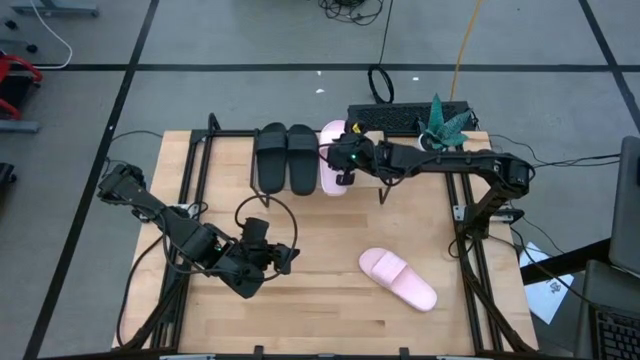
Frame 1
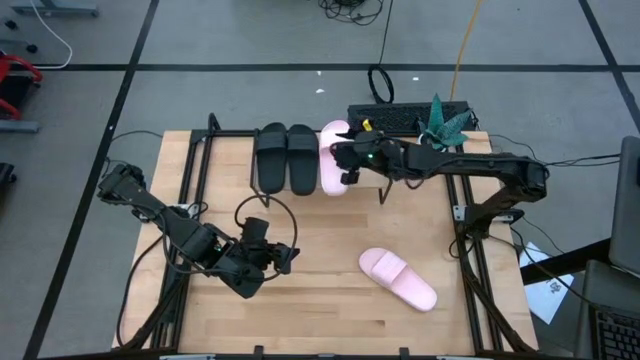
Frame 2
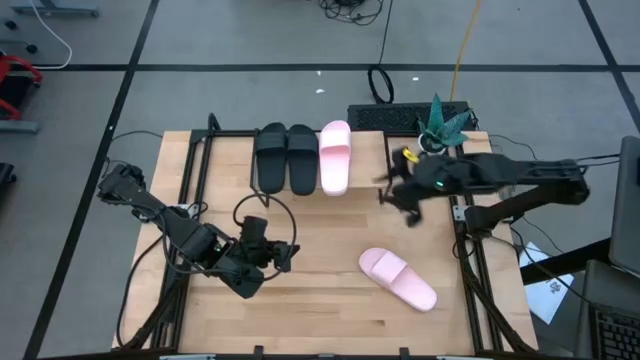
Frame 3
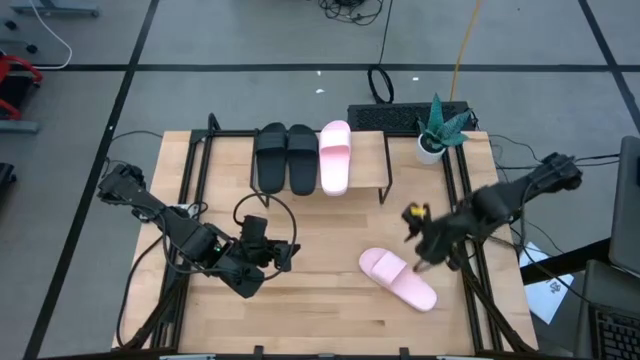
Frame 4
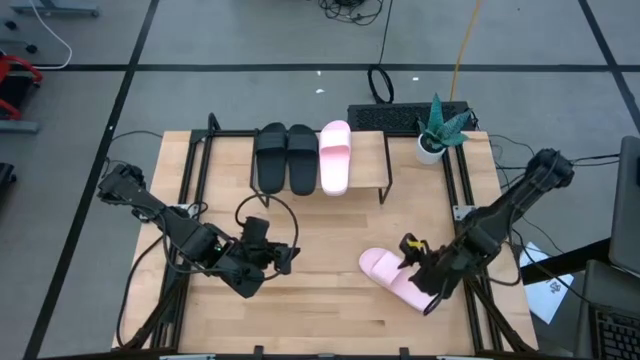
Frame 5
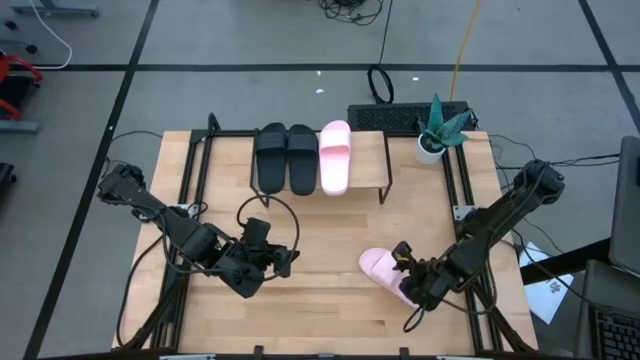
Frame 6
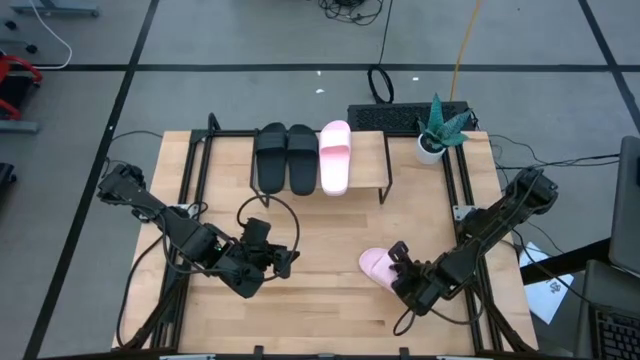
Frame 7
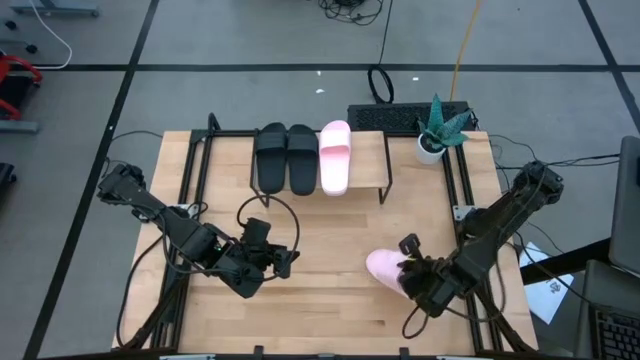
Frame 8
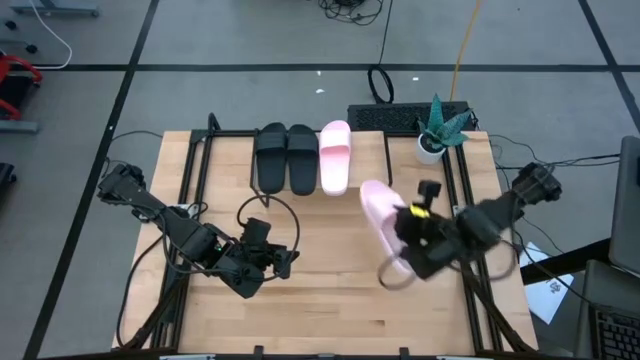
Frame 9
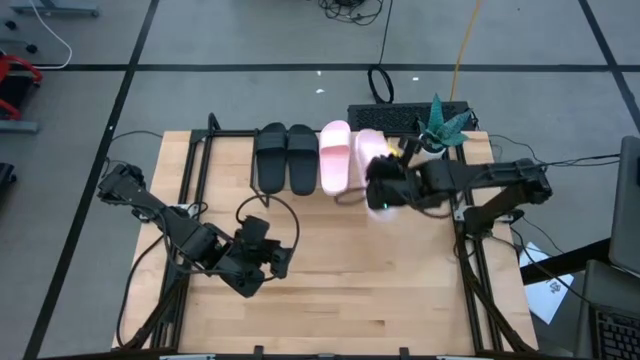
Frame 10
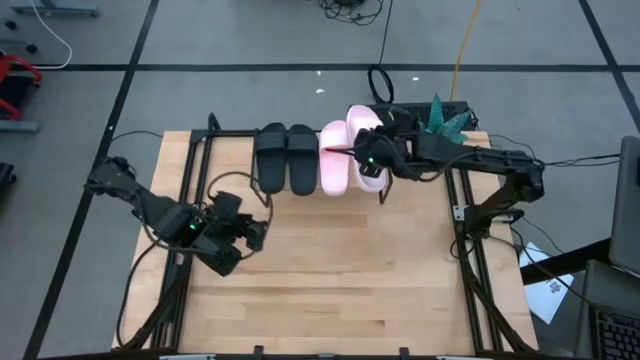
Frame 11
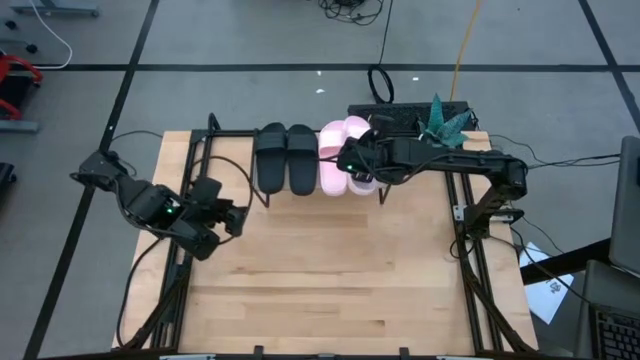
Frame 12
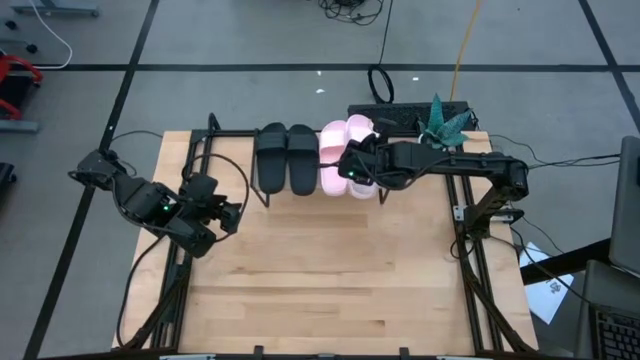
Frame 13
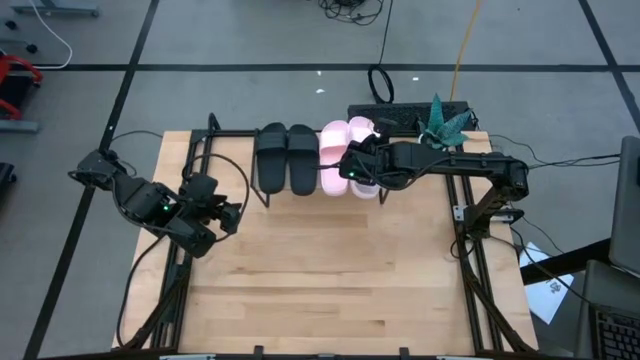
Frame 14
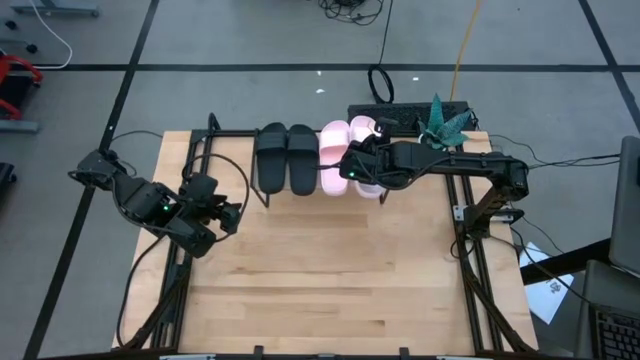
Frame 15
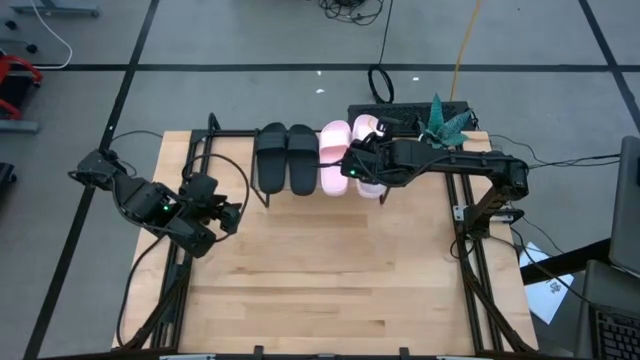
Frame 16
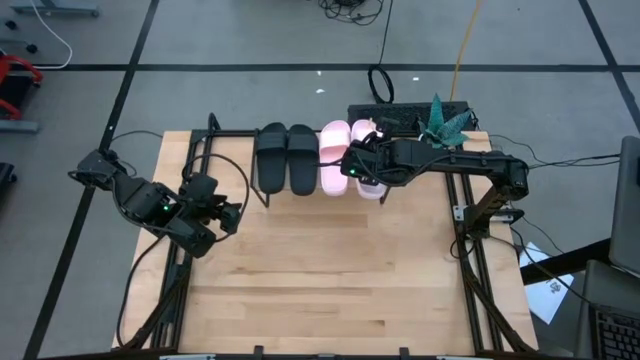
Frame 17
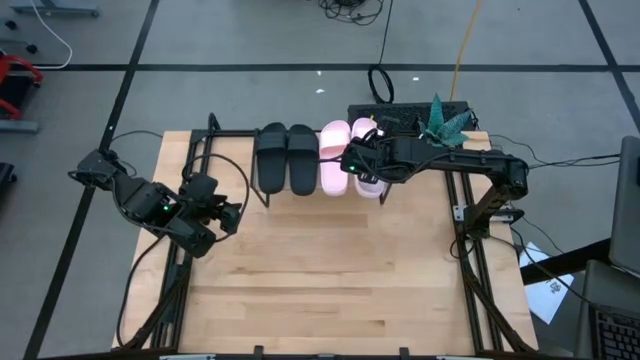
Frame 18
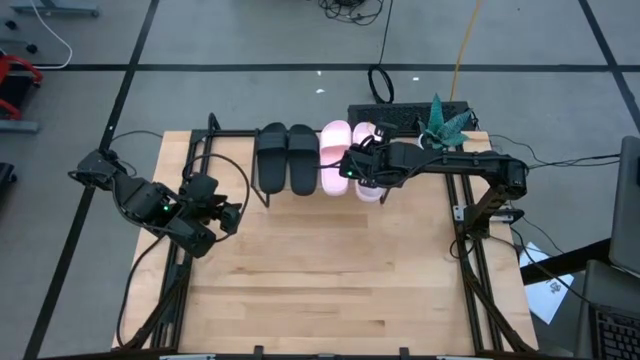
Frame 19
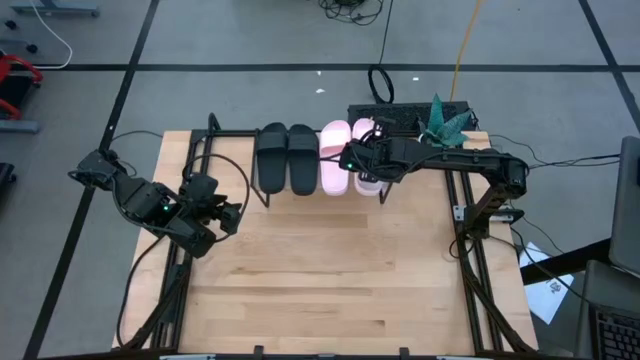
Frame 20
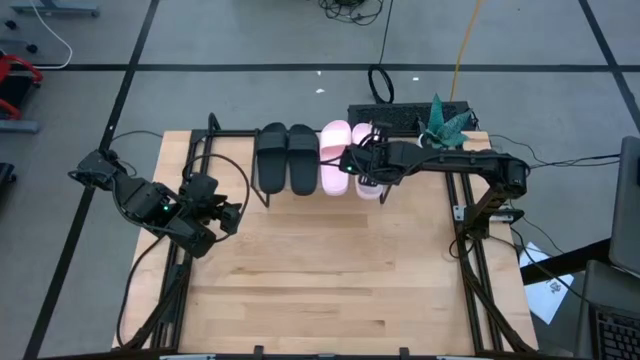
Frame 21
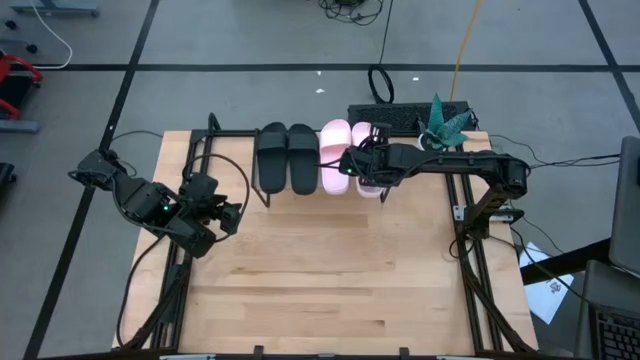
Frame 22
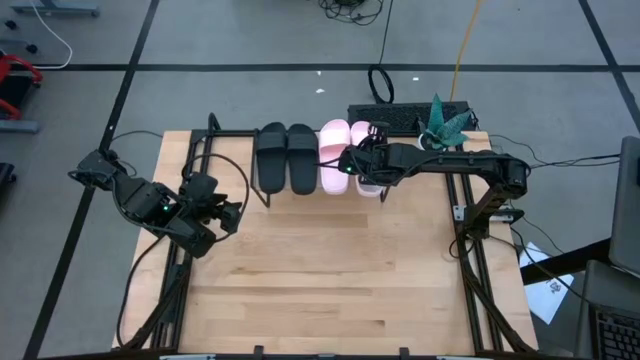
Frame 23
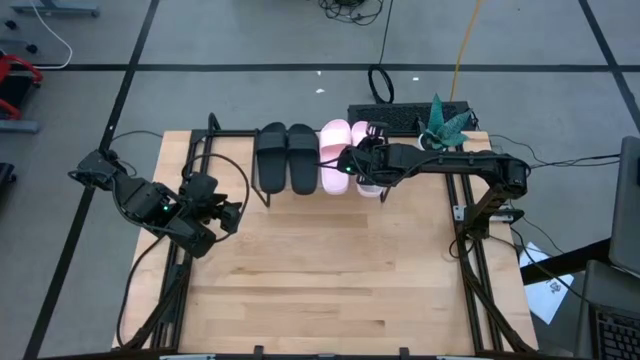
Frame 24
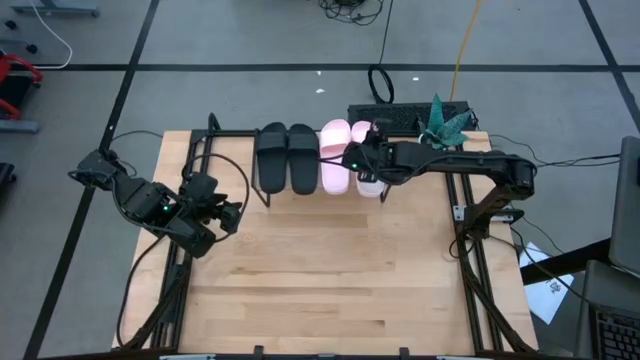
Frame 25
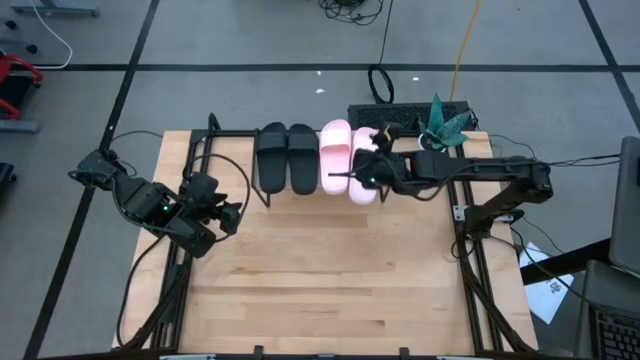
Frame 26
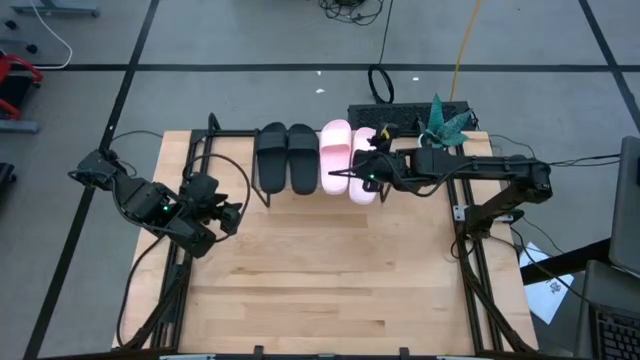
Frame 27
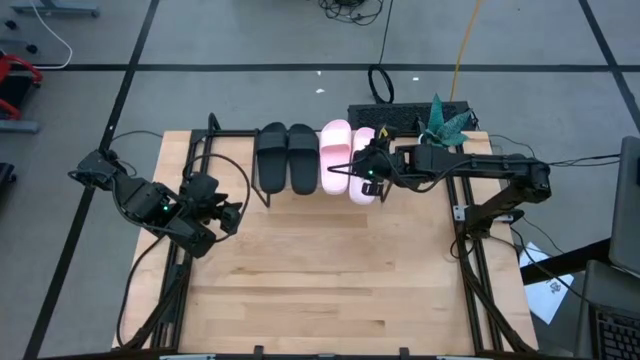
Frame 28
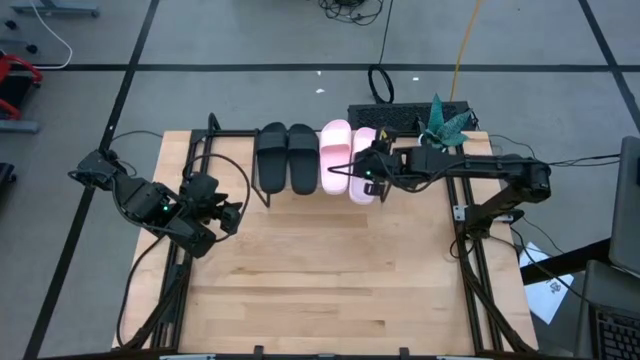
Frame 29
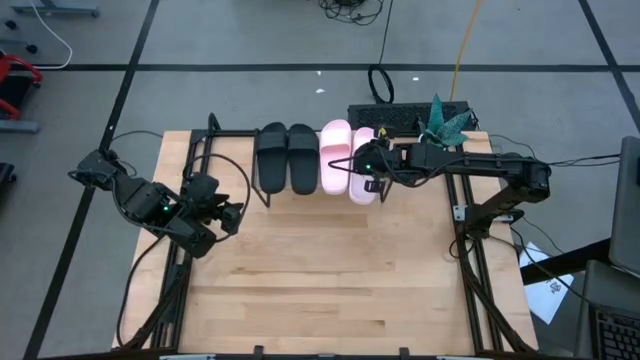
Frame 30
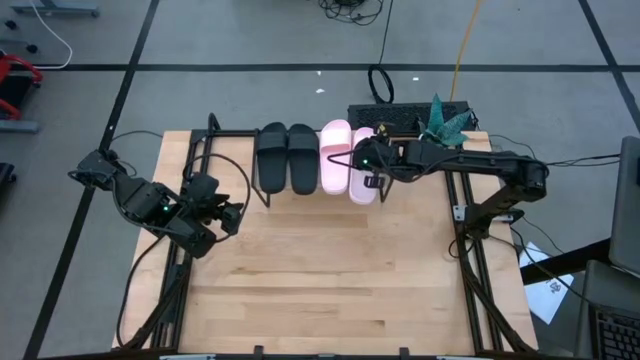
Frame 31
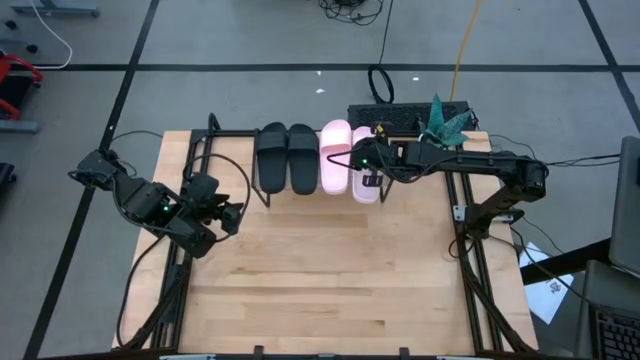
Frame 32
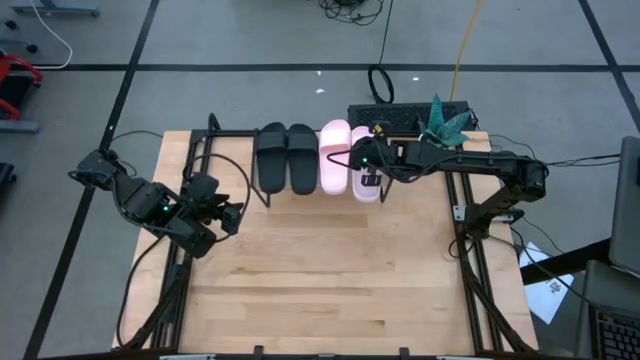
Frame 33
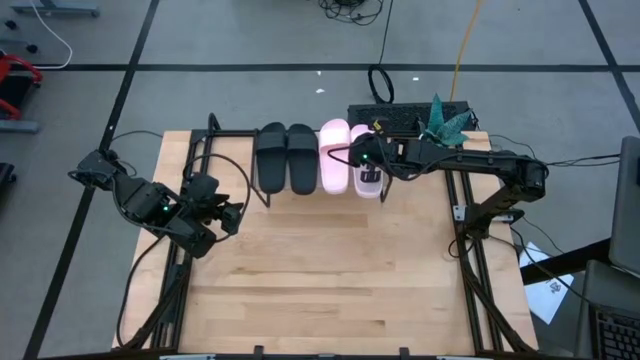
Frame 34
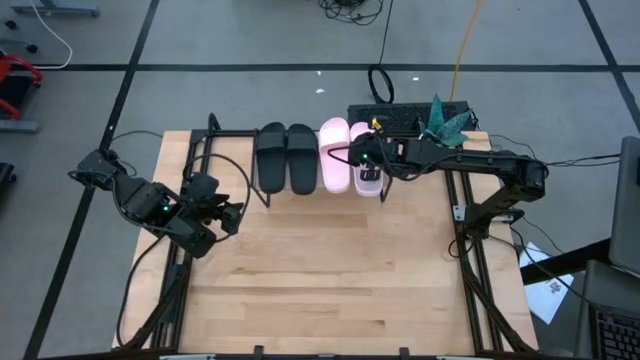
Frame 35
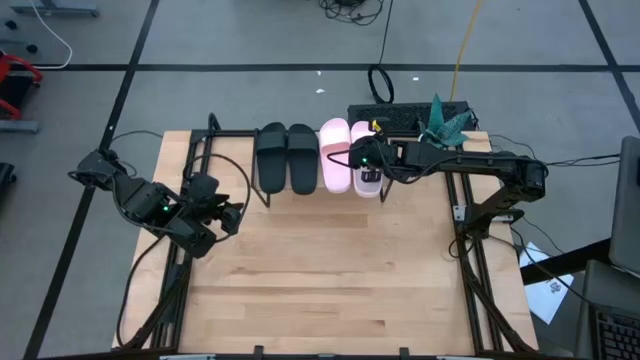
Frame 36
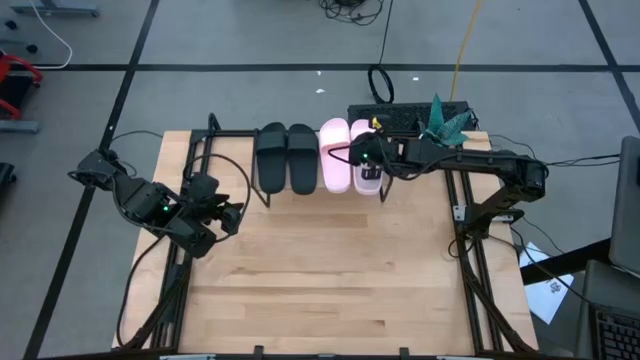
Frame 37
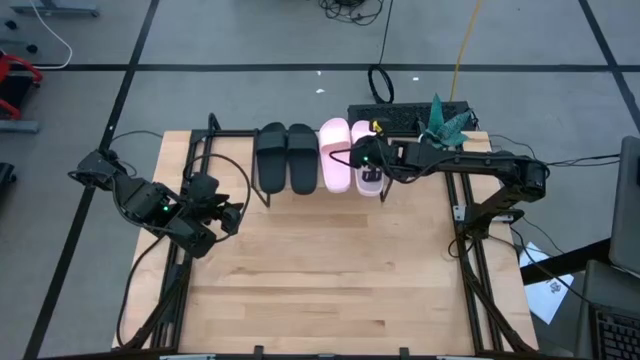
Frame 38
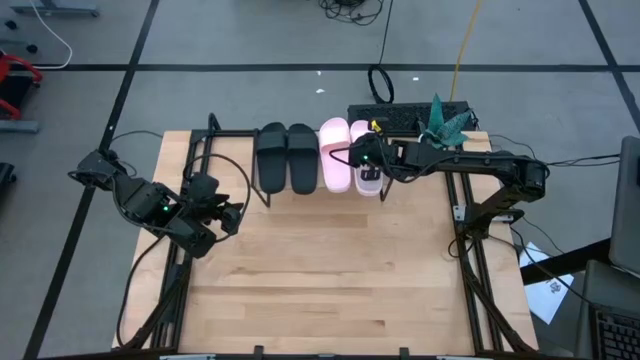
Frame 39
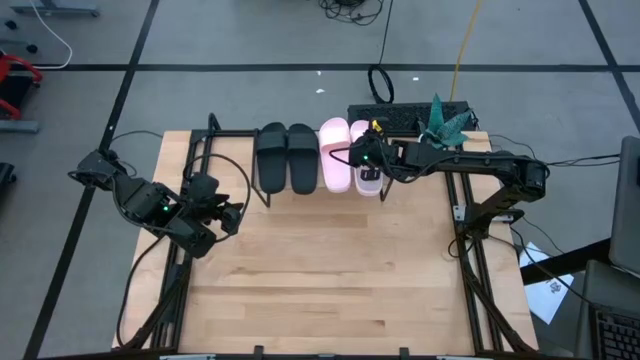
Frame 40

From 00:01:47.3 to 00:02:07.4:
Task: Pick and place slides into the shelf
Put the pink slipper on the shelf

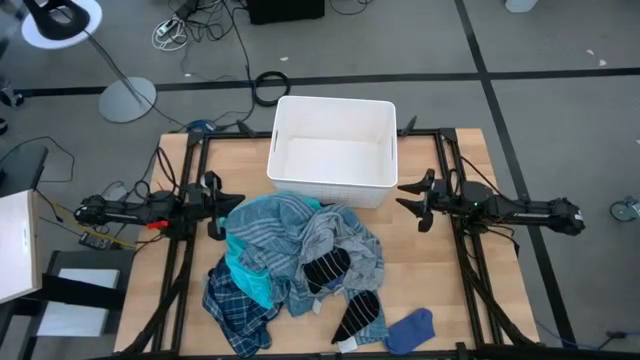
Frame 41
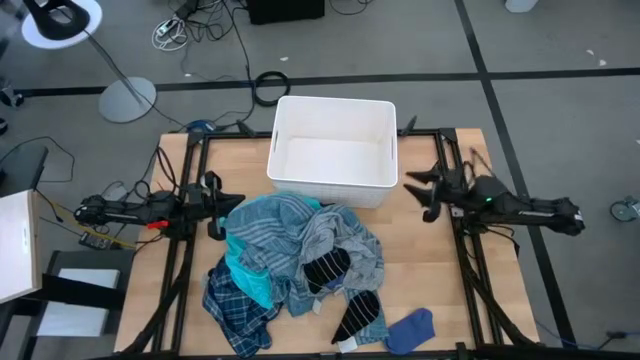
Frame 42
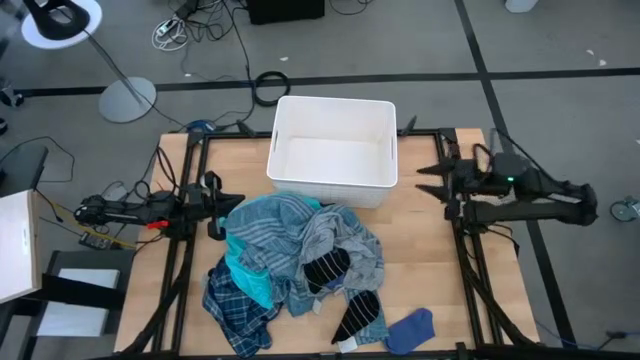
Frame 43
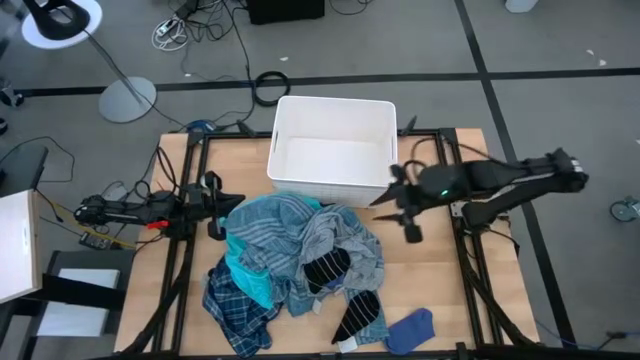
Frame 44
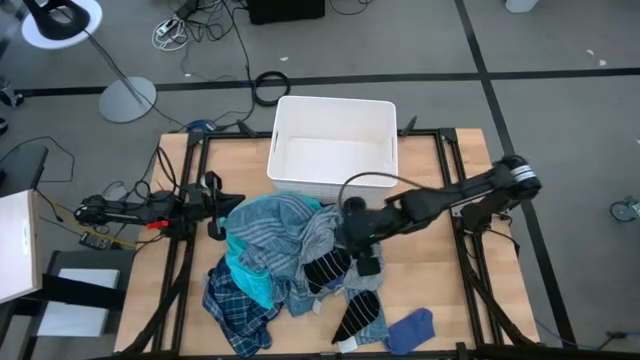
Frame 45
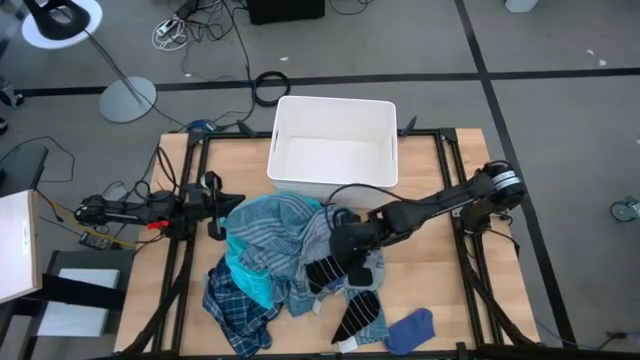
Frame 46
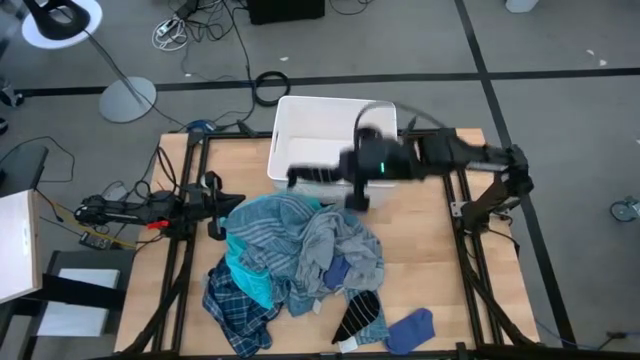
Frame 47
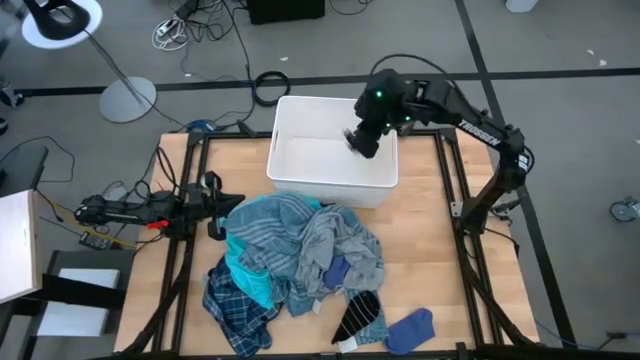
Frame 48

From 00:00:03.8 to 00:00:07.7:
Task: Sort clothes
Put the top black sock into the white bin
